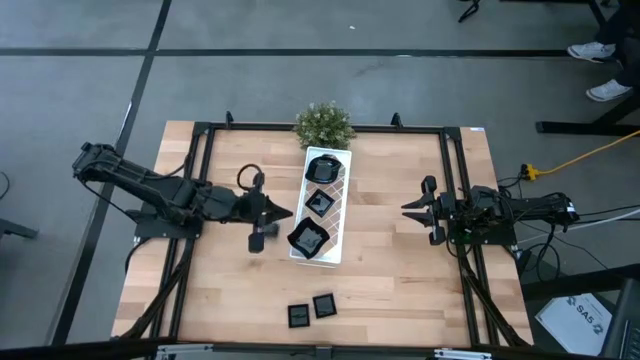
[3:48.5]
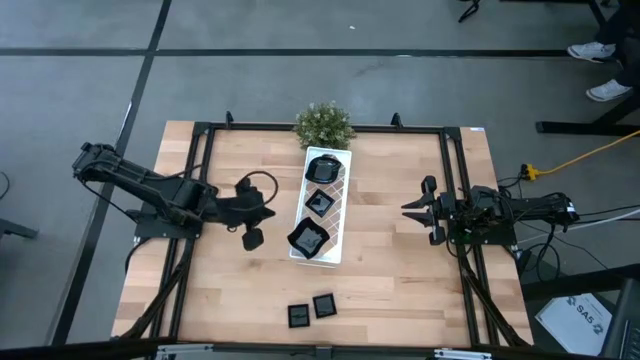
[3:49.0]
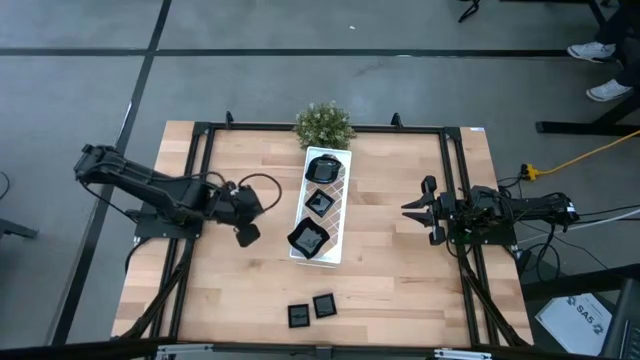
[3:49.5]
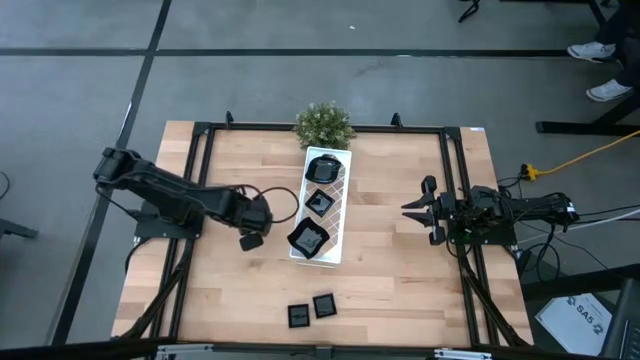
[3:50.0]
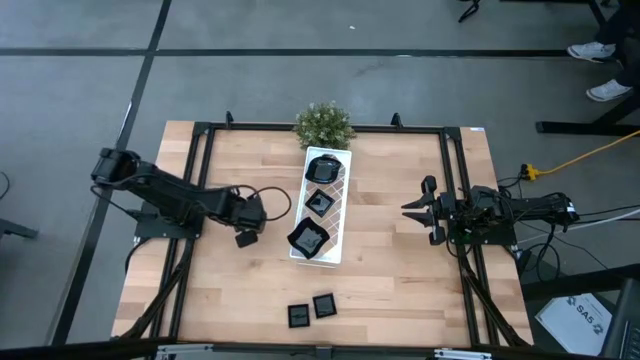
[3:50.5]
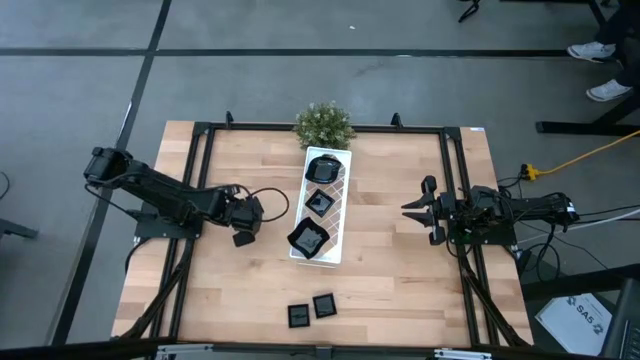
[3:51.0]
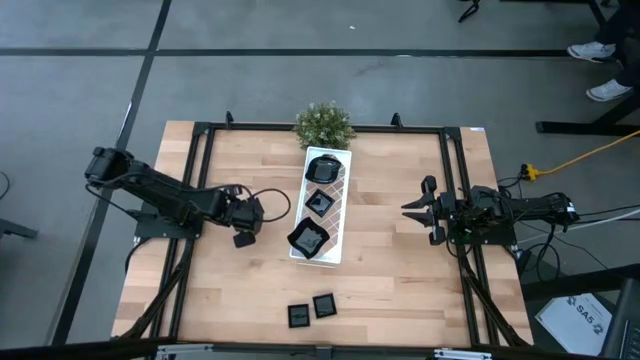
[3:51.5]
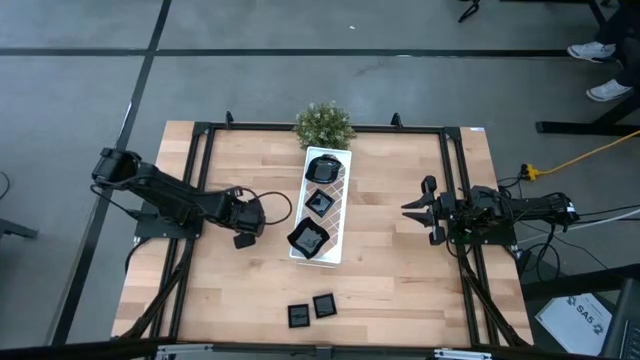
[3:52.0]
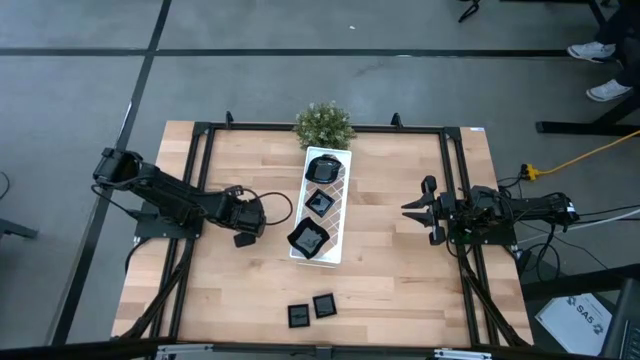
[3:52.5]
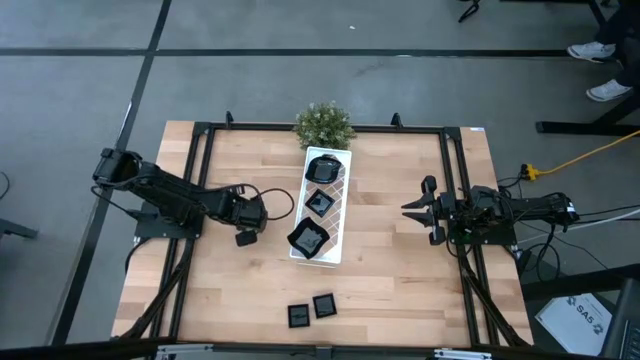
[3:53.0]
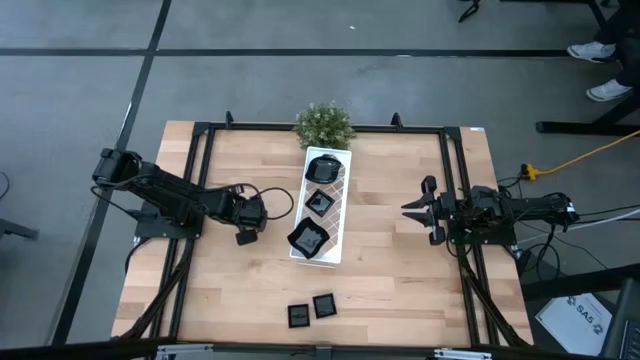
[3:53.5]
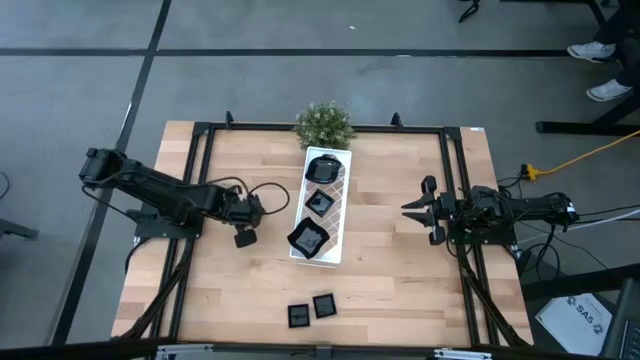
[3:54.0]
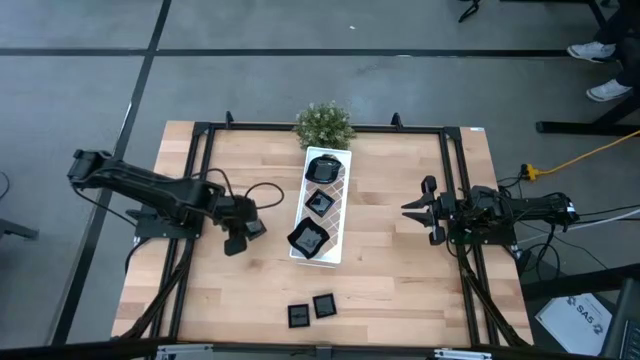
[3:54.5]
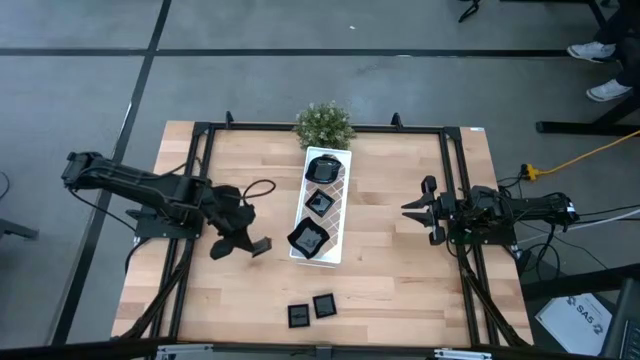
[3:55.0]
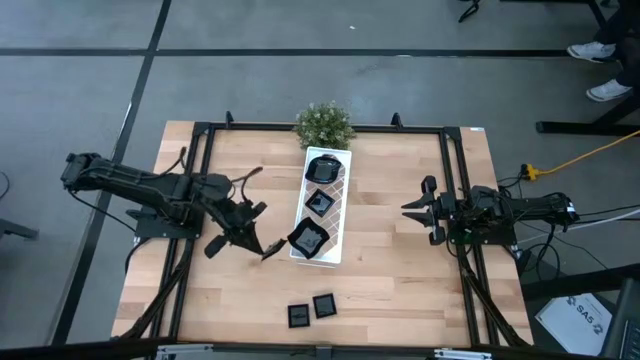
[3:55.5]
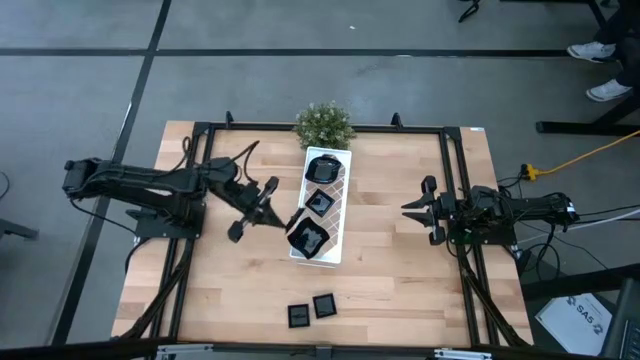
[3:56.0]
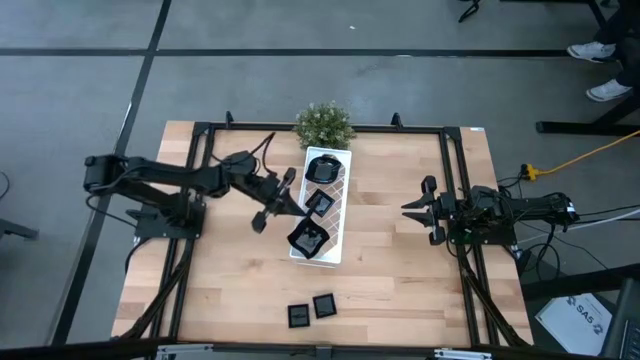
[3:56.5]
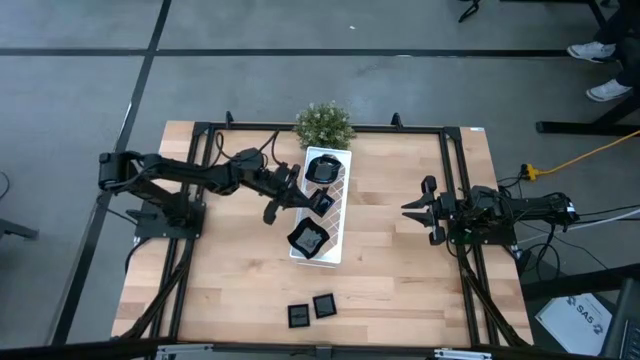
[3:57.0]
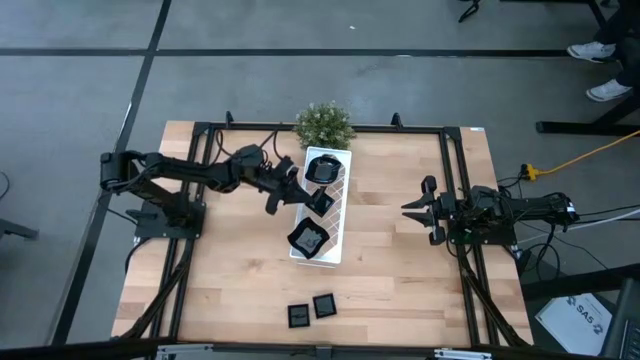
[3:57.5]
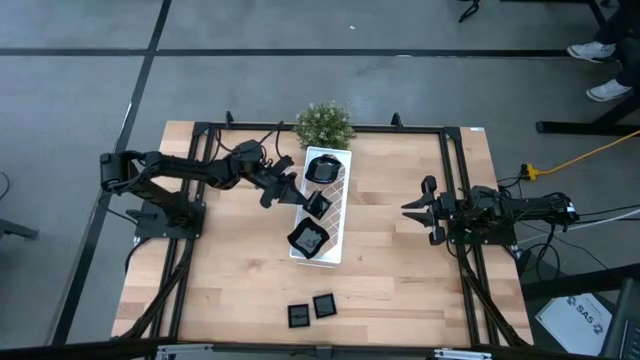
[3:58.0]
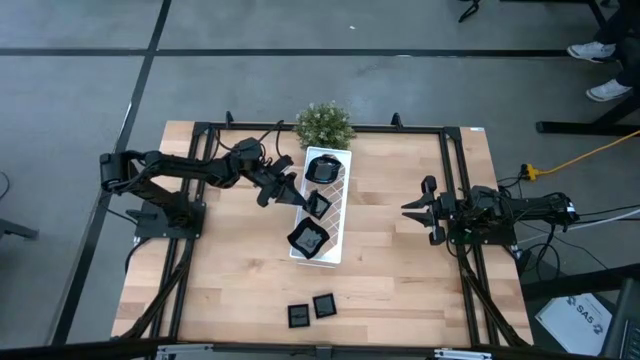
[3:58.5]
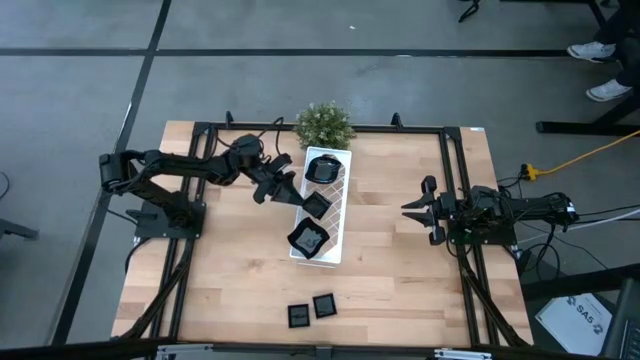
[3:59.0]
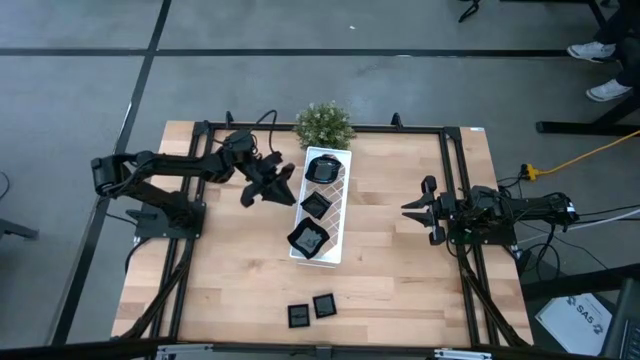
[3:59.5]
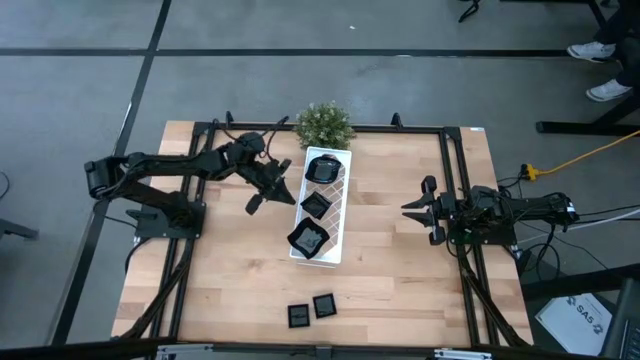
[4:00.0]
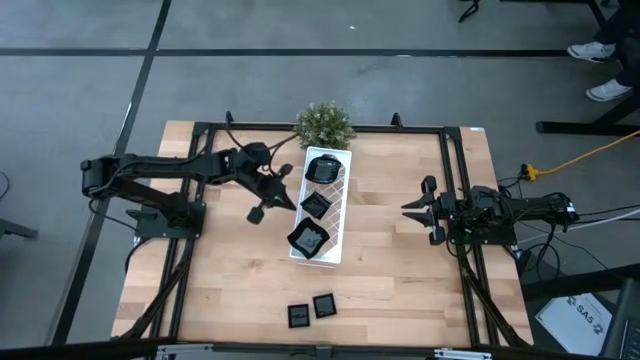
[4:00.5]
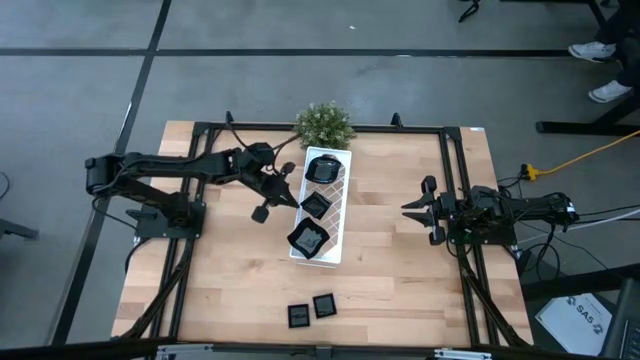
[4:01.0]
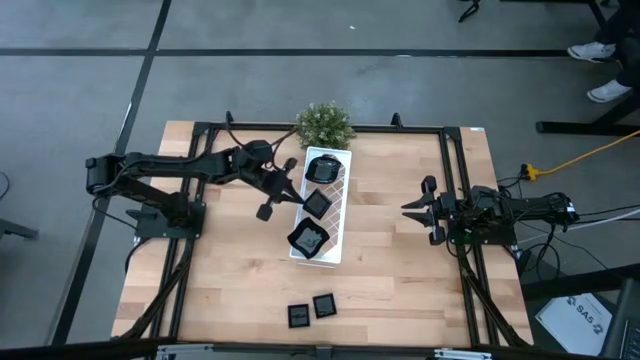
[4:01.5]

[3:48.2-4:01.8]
Task: Pick & Place Mini shaped plates
Stack the square plate on top of the square plate on the shelf

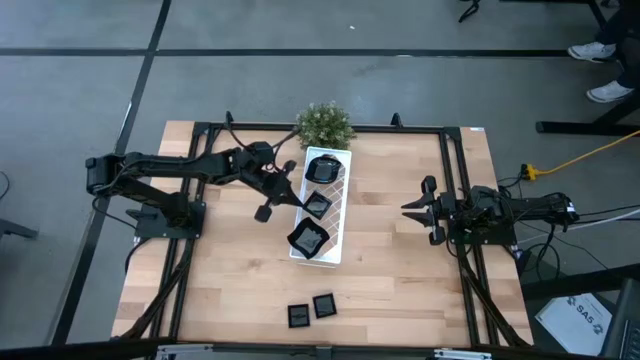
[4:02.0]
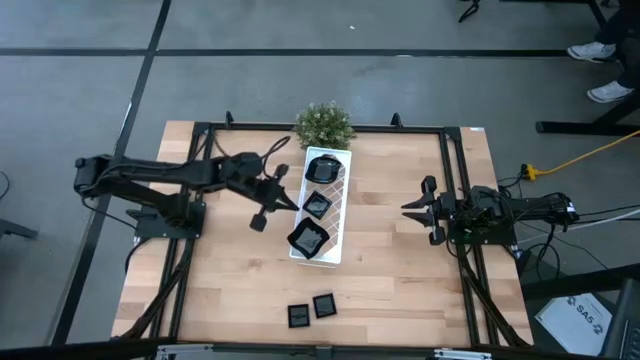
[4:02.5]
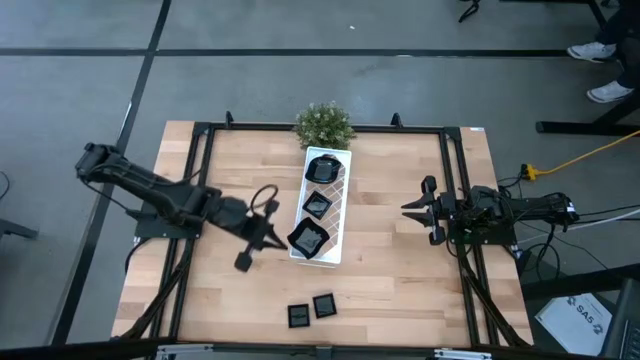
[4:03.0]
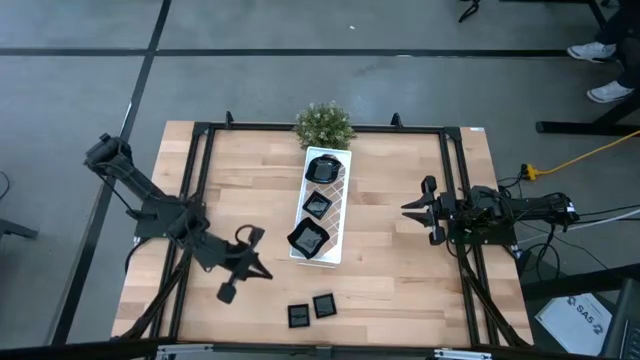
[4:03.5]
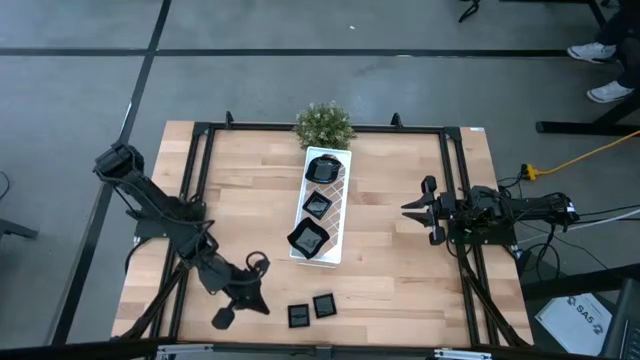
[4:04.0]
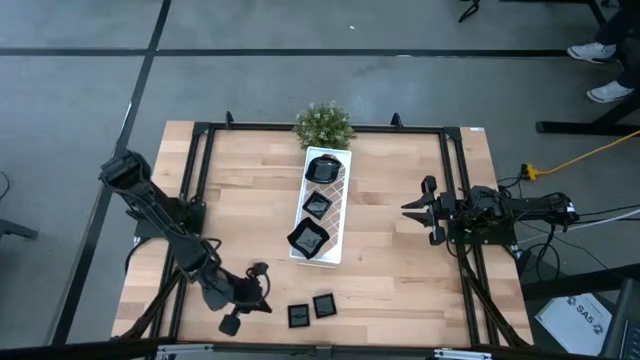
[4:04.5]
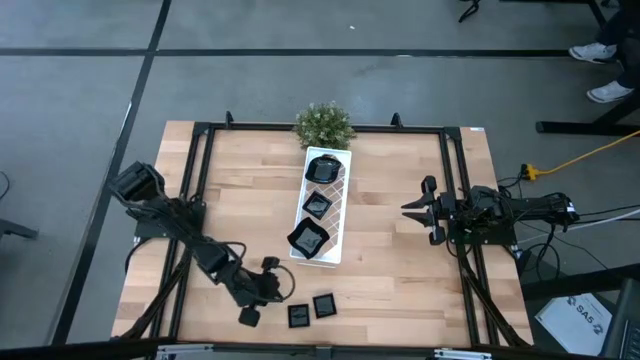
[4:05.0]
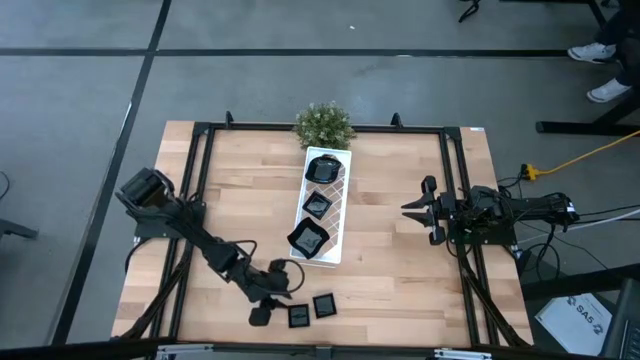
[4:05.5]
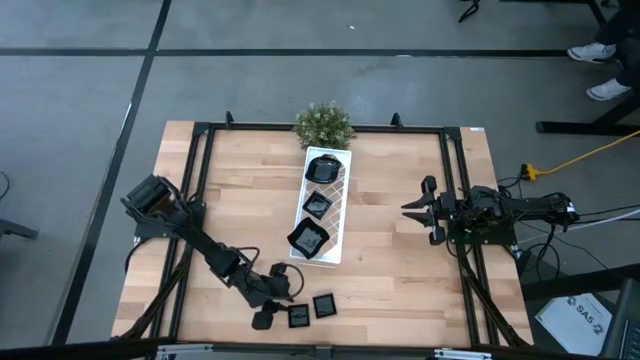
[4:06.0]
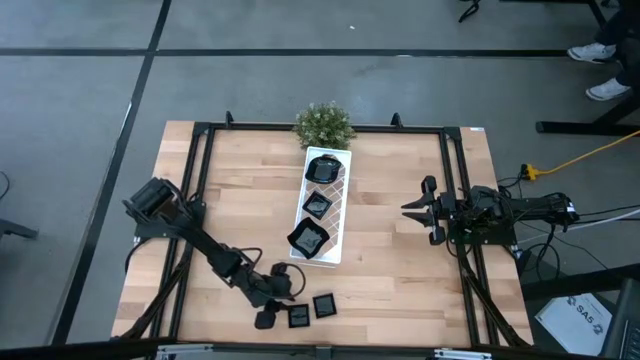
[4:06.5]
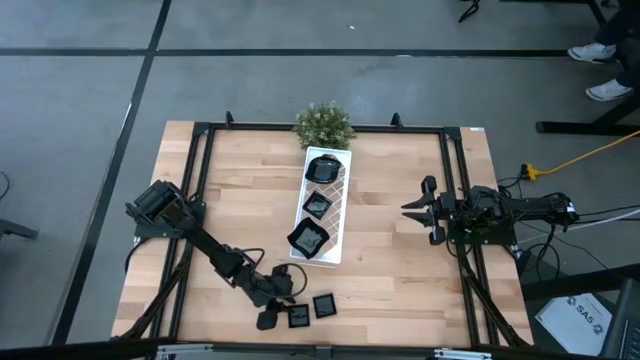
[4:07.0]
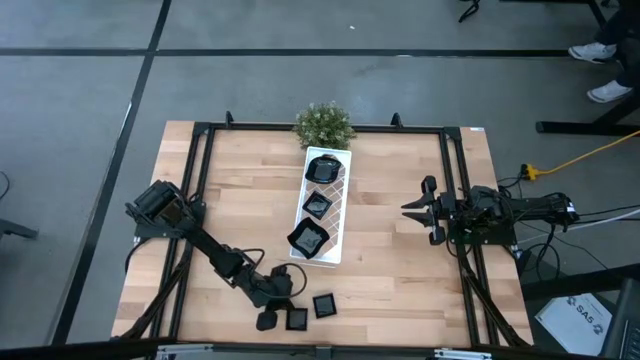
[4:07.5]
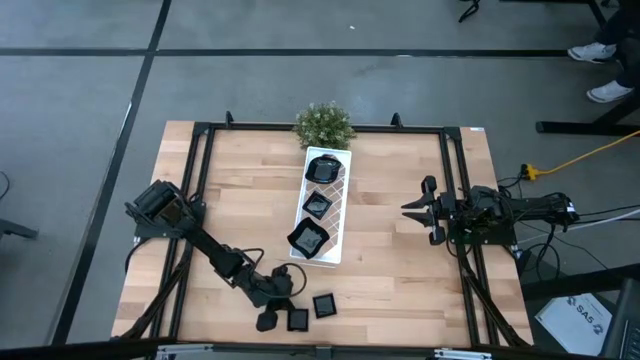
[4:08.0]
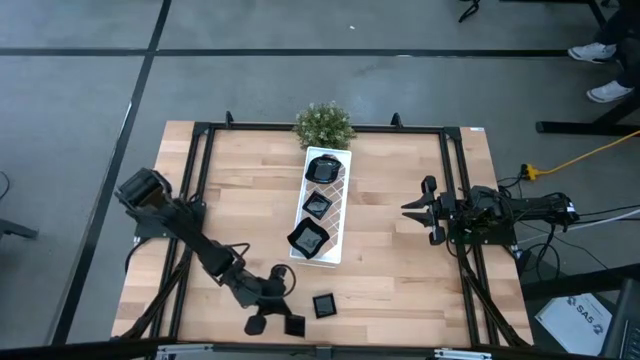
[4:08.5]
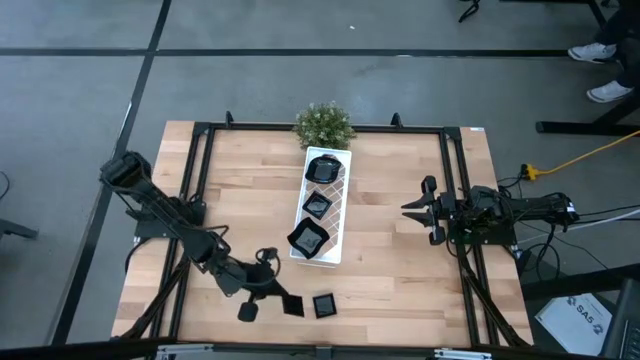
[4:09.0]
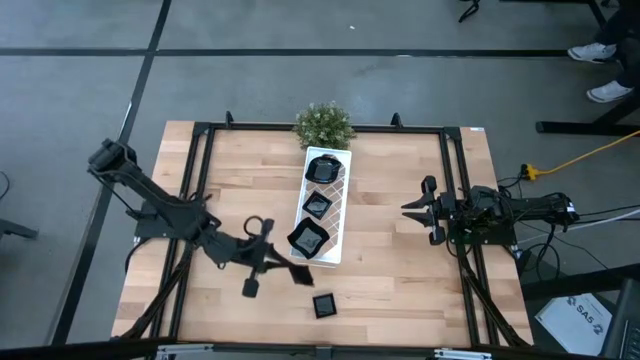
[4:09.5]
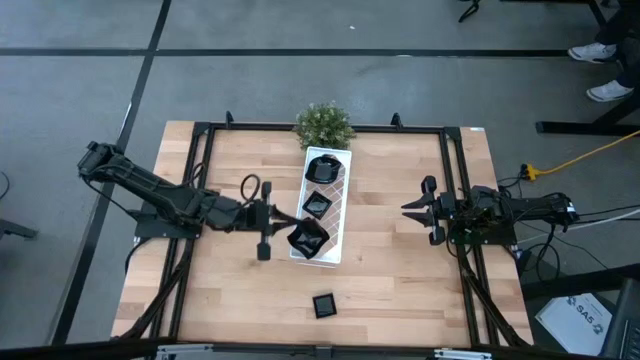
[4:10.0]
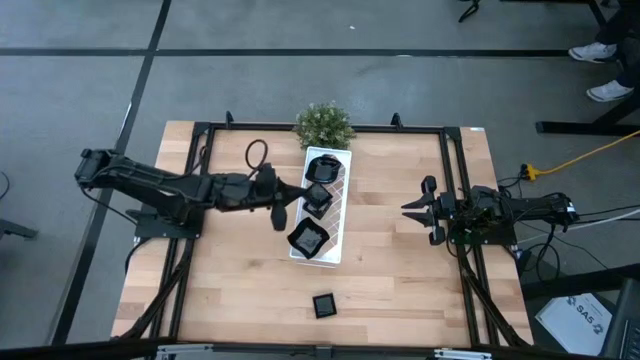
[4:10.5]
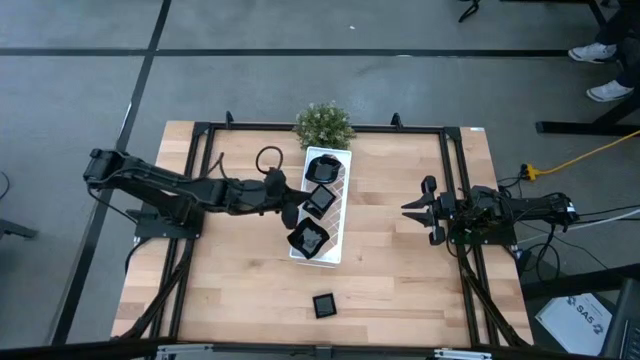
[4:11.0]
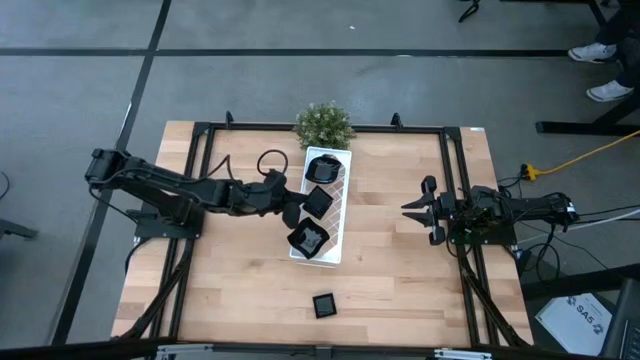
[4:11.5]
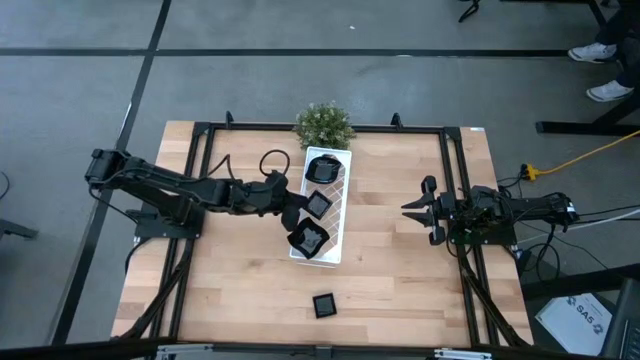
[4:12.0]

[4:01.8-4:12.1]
Stack the square plate on top of the square plate on the shelf
